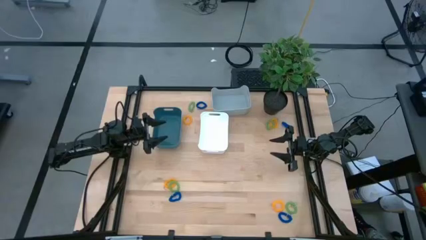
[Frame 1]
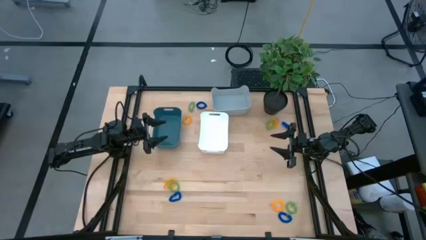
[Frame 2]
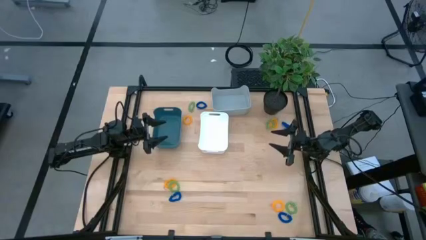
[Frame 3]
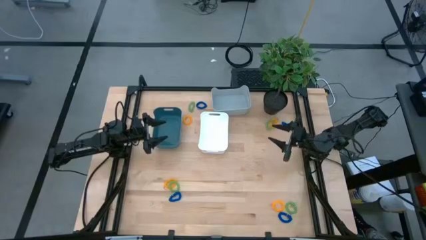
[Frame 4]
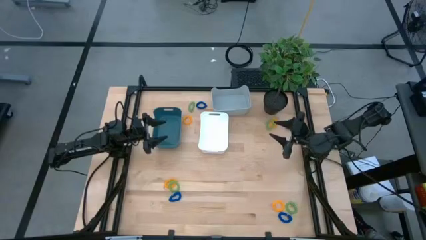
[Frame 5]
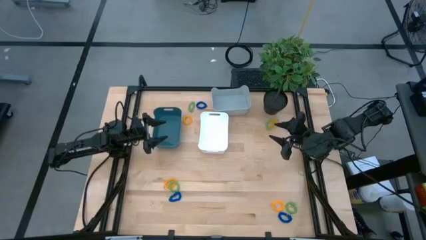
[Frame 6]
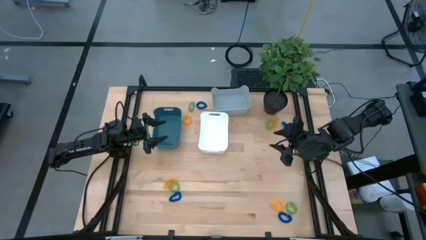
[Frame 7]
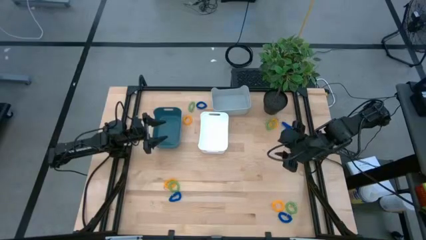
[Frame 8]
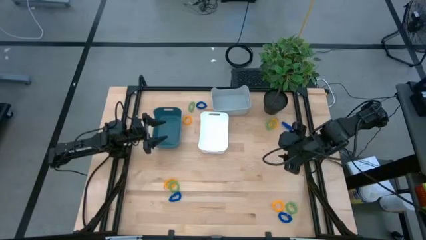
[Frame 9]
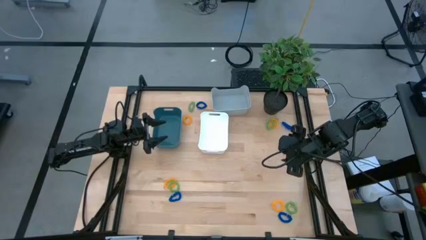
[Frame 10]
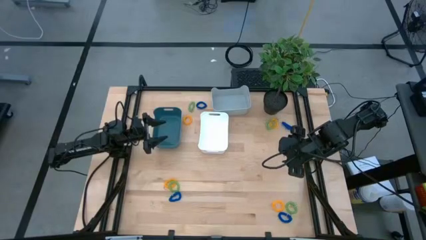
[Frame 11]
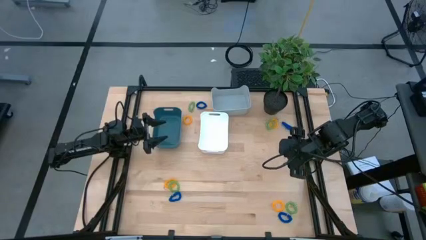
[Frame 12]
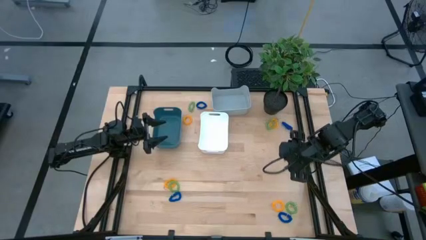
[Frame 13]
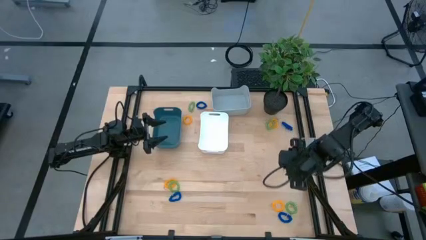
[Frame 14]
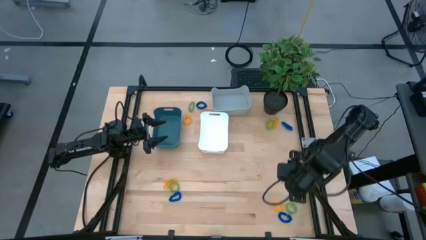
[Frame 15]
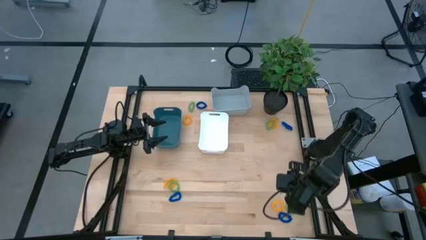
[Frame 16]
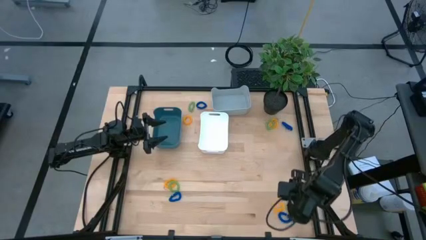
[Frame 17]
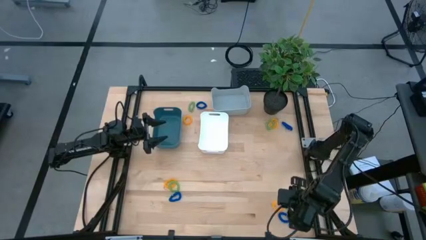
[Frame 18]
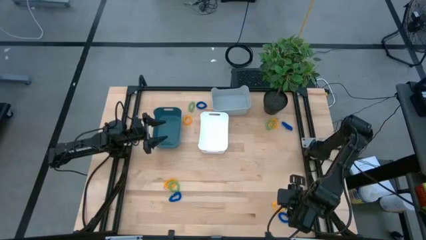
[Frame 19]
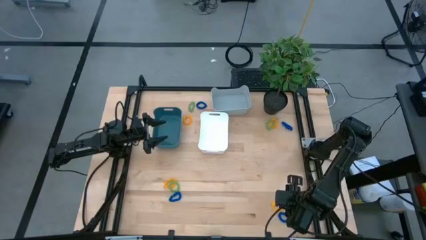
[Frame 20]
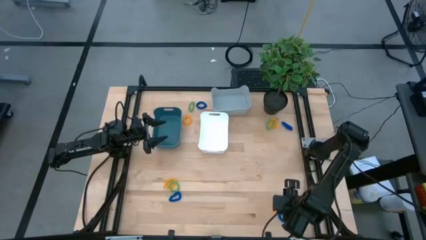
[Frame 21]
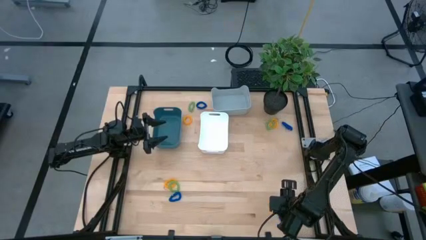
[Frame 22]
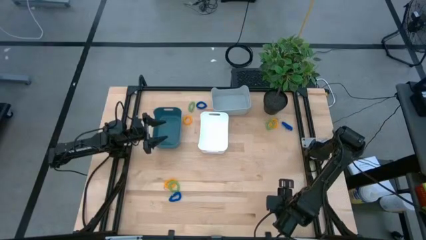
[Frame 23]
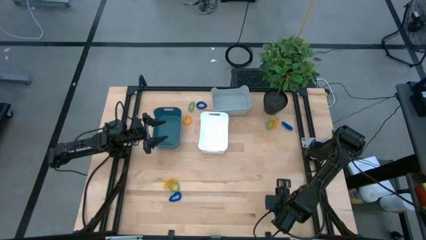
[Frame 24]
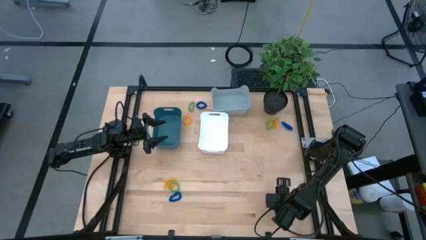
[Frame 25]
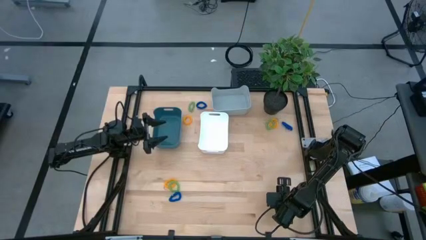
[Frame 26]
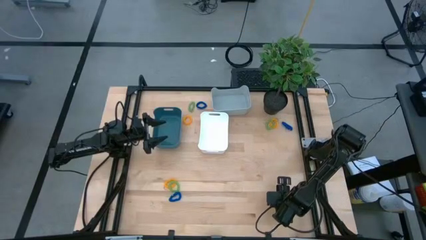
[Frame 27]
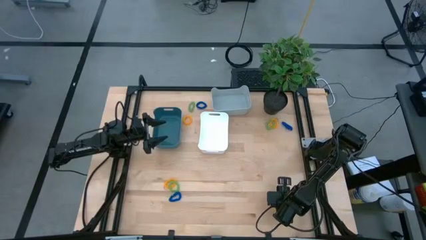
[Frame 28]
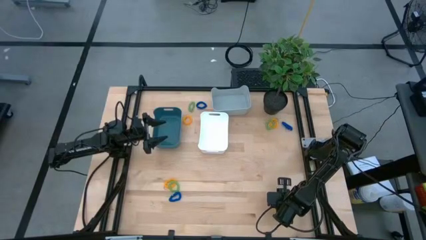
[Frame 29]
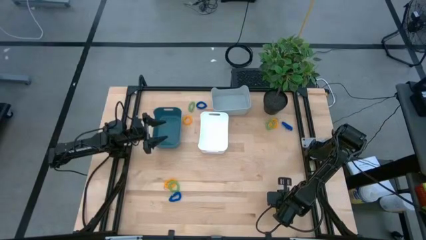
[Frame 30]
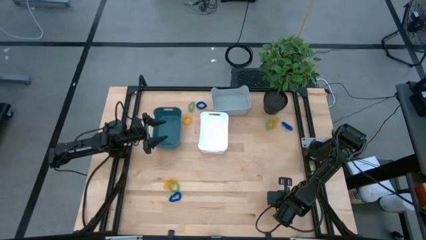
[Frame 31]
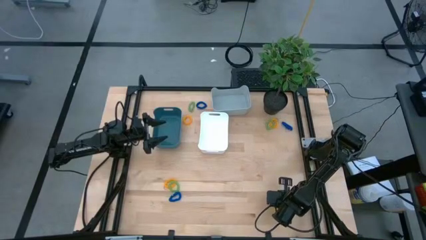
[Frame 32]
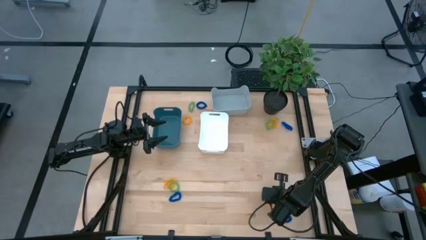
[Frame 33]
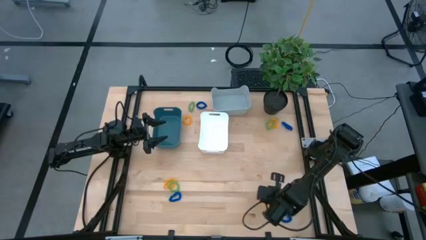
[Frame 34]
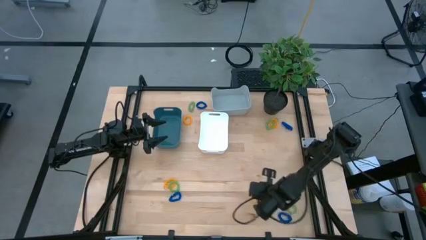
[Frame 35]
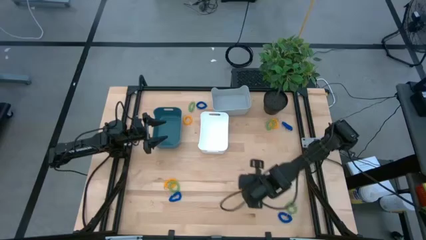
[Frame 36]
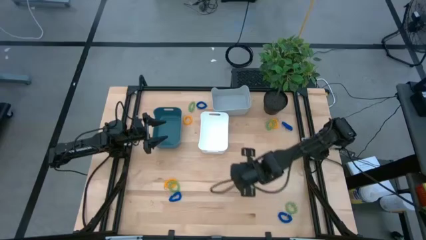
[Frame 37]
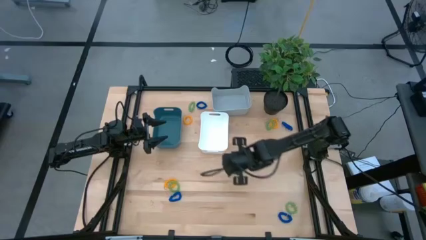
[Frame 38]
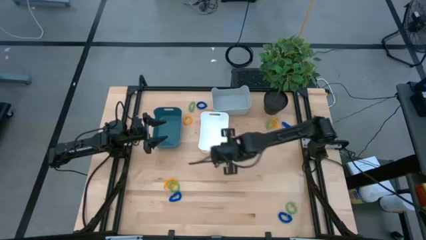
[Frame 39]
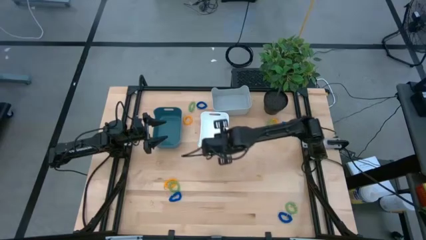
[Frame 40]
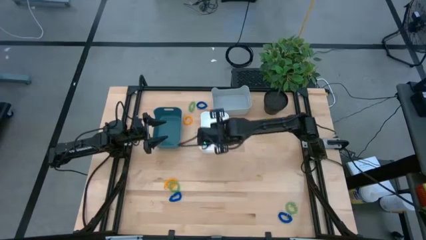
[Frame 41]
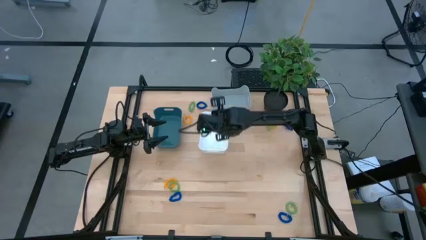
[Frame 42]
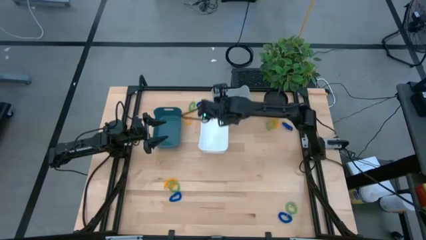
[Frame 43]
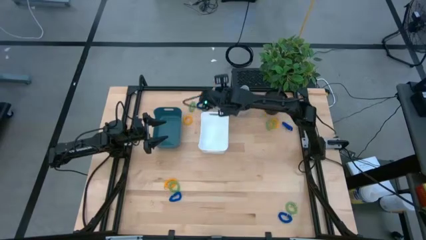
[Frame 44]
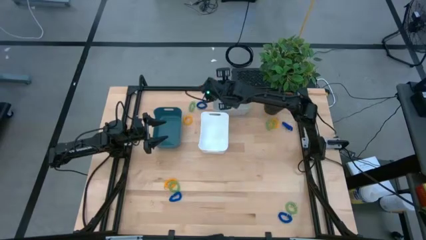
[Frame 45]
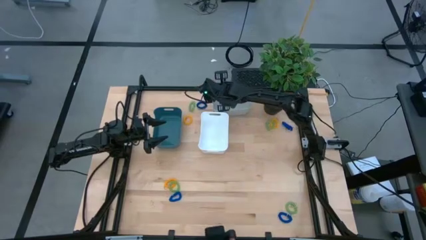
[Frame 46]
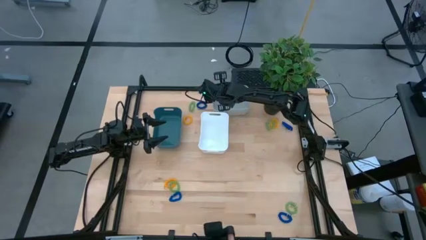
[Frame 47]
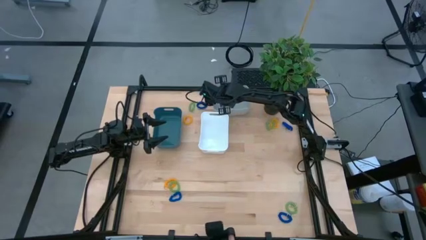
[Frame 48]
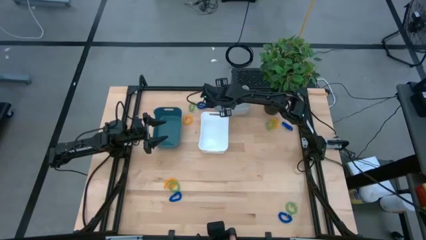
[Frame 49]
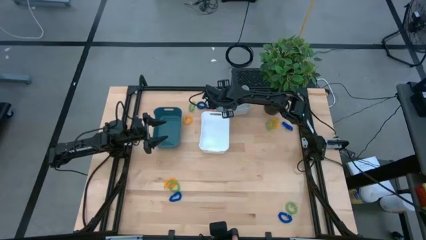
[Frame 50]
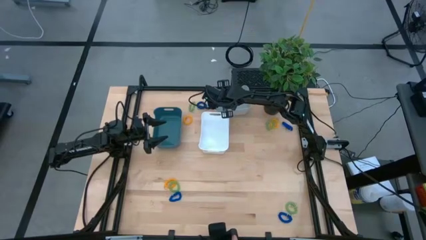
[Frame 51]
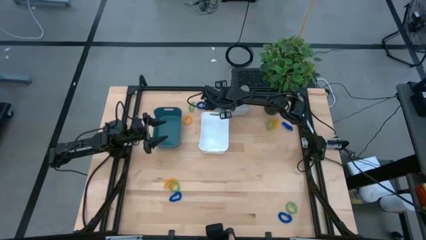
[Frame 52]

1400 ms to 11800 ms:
Task: Sort spring keychains
Put the yellow spring keychain into the gray bin
